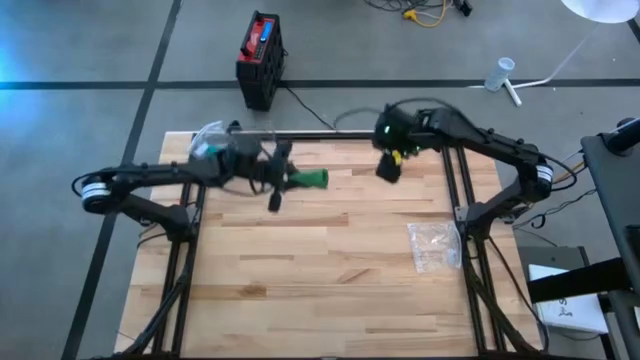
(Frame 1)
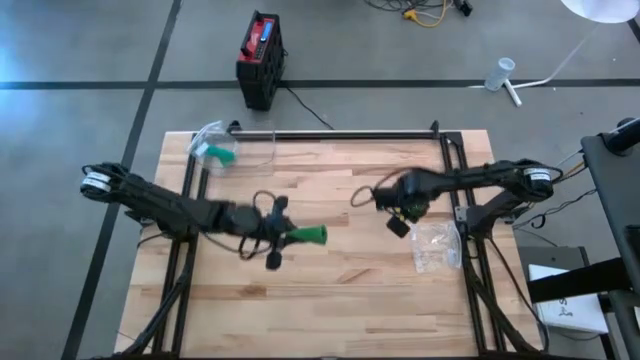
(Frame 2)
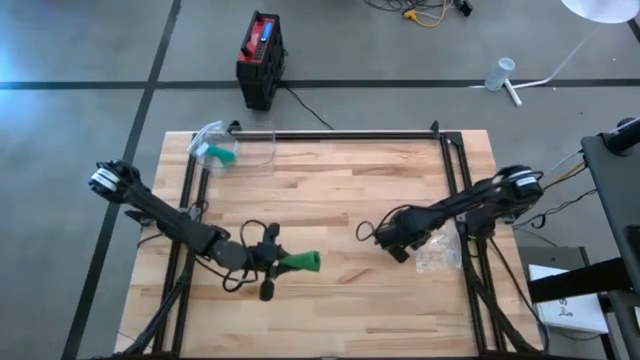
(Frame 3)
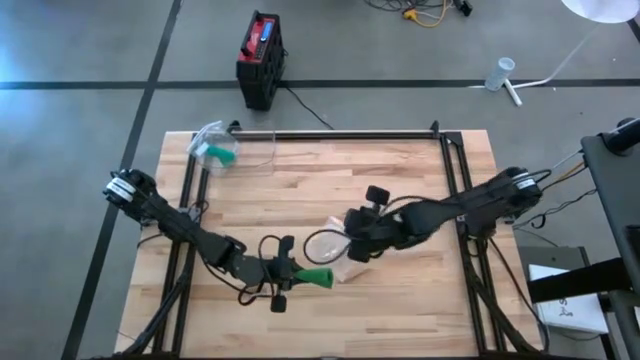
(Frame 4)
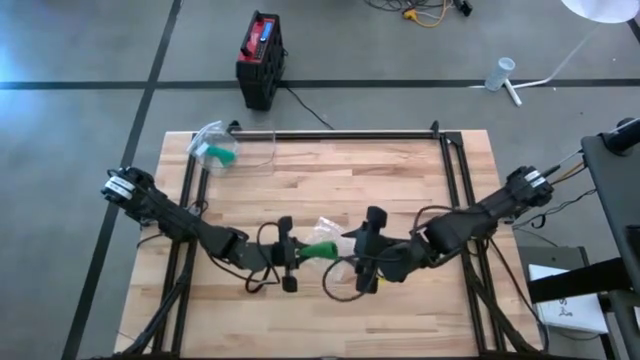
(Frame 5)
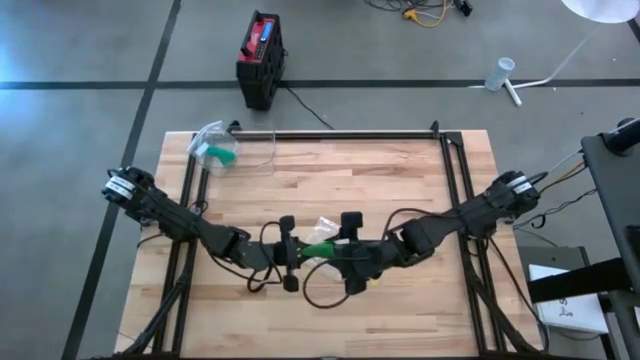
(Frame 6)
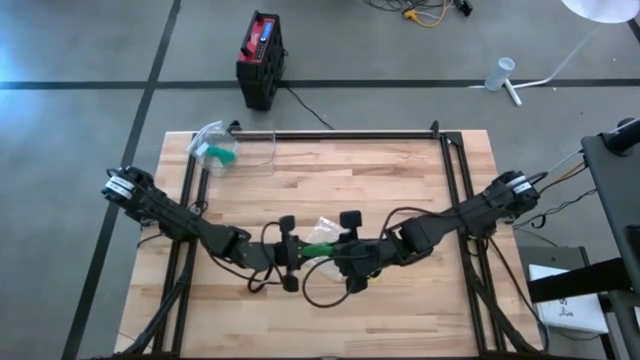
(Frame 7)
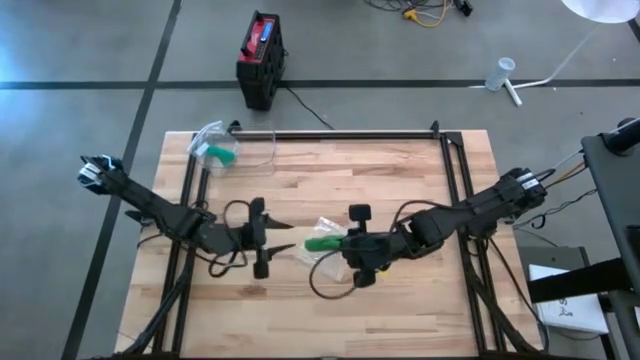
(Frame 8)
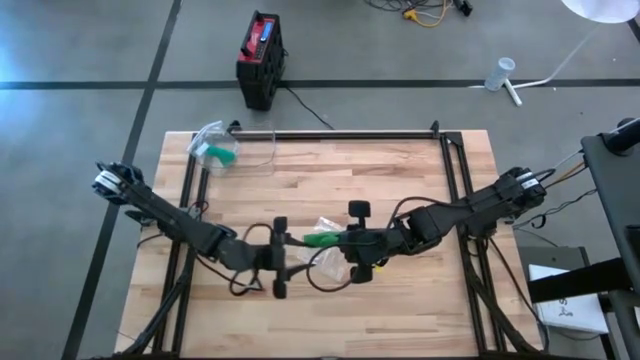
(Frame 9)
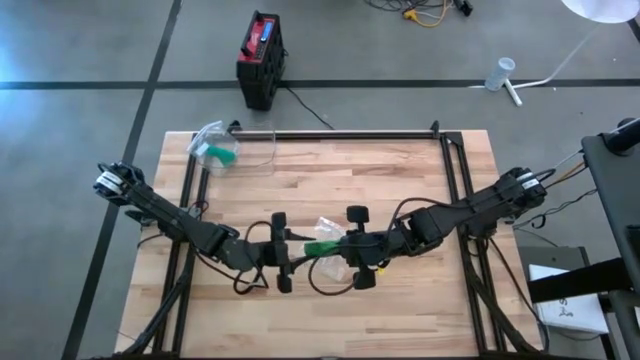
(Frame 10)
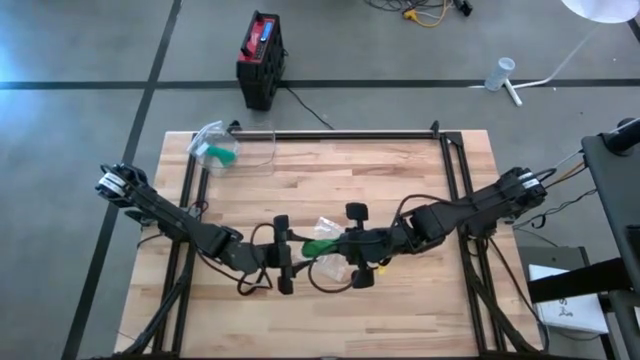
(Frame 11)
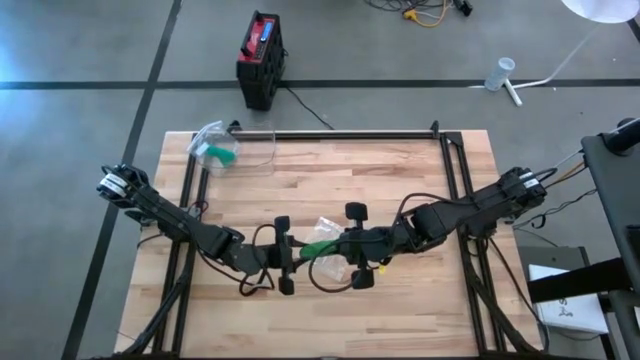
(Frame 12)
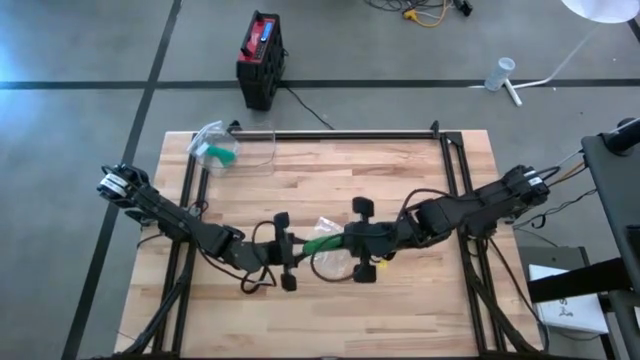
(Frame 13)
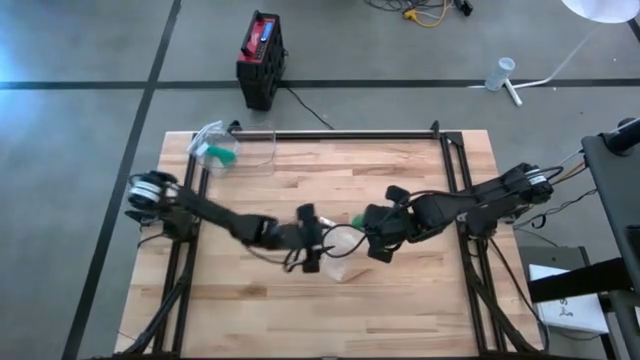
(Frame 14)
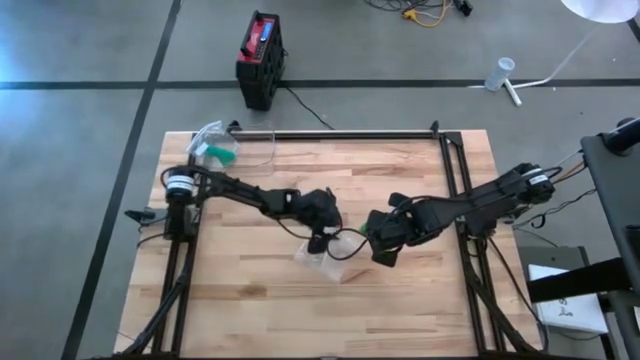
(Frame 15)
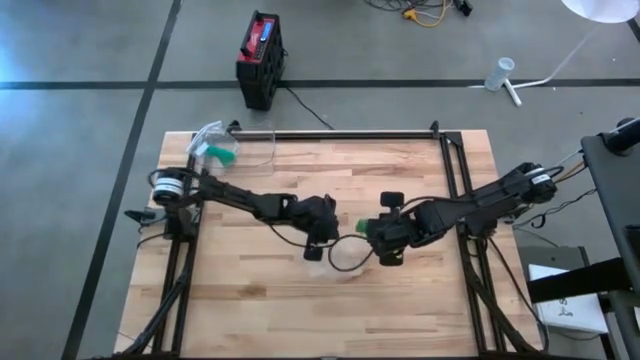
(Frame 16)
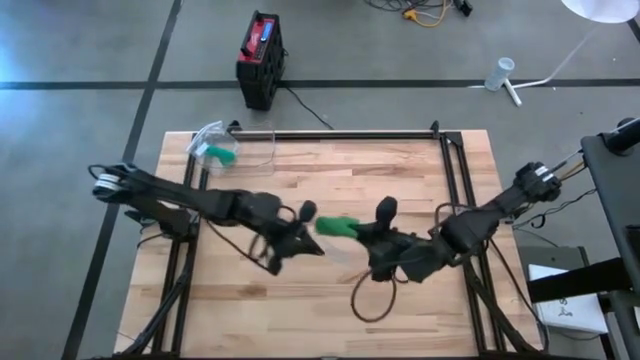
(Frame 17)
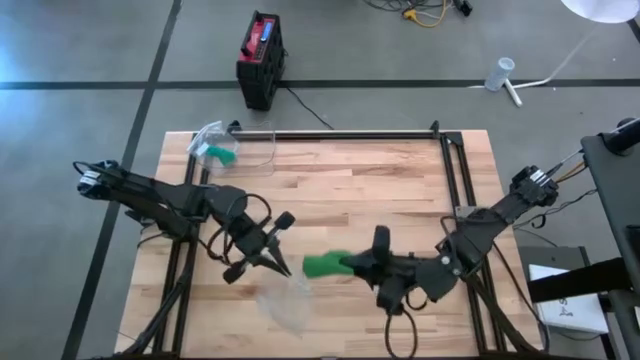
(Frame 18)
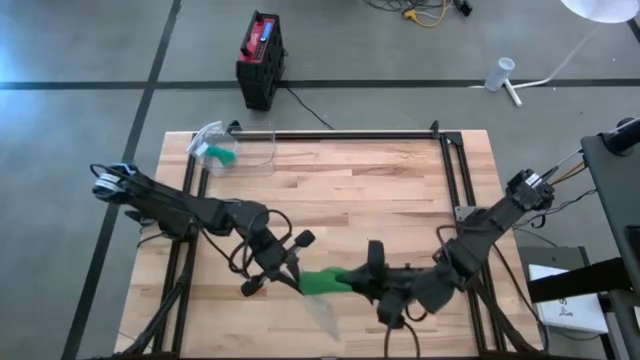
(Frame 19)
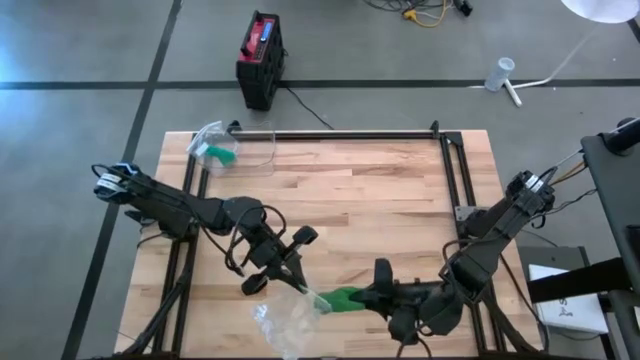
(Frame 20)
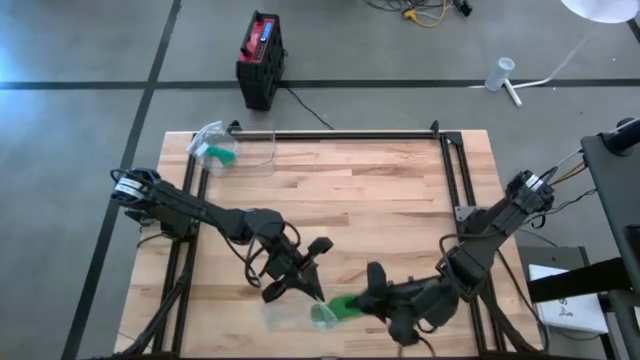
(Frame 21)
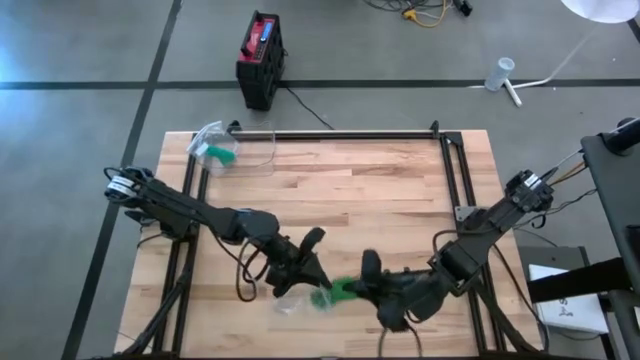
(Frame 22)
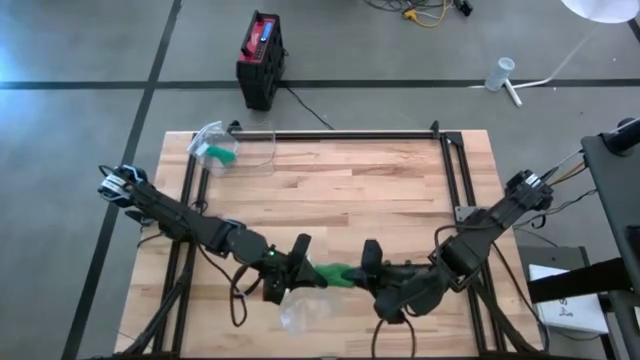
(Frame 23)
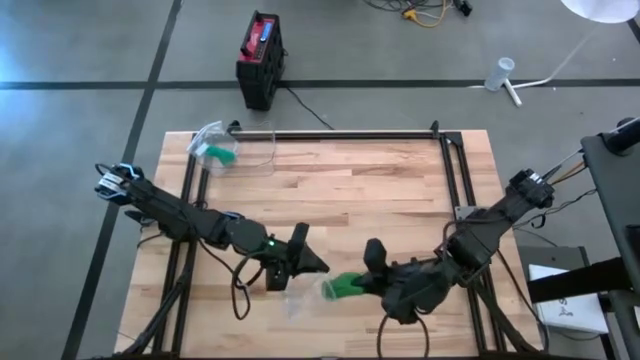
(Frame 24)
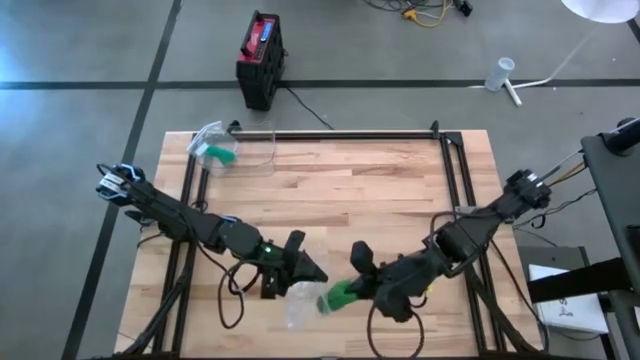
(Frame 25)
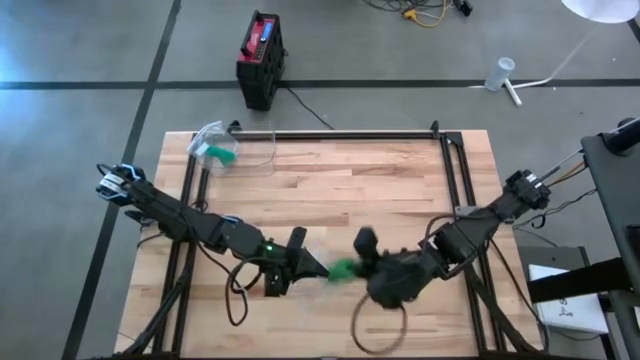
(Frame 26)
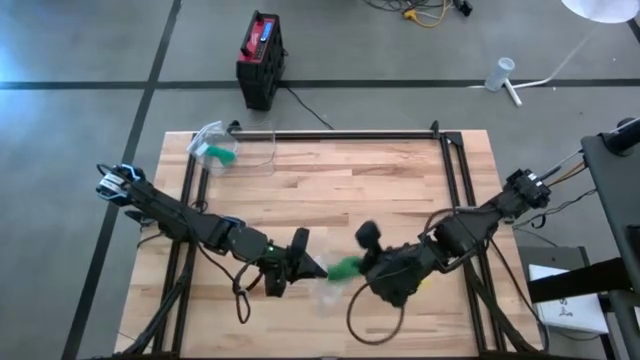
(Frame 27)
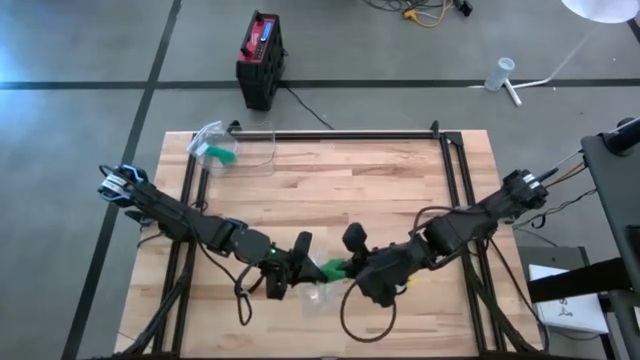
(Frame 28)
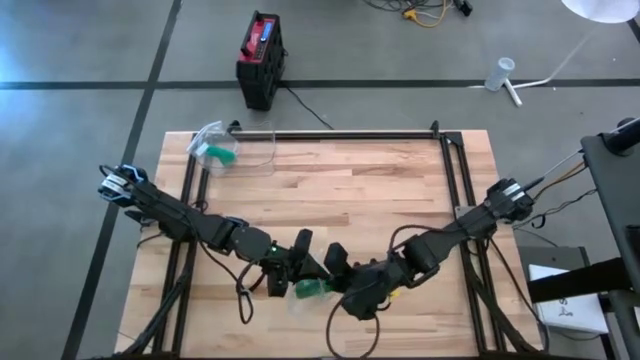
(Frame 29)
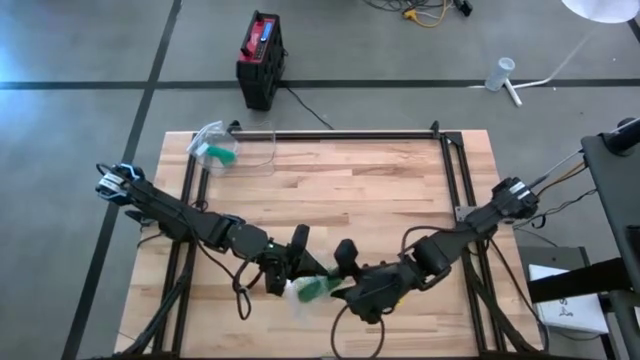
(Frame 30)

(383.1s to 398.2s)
Task: Roll bandage
Put the green rolled bandage into the transparent zip bag

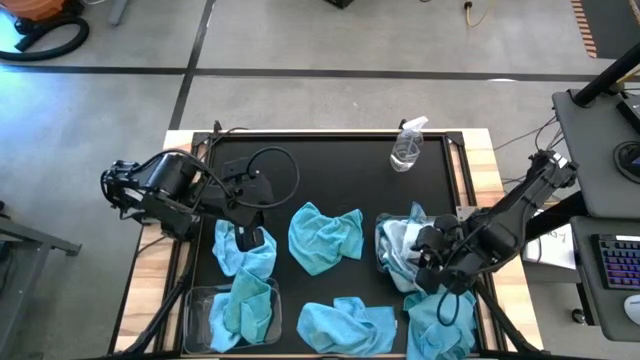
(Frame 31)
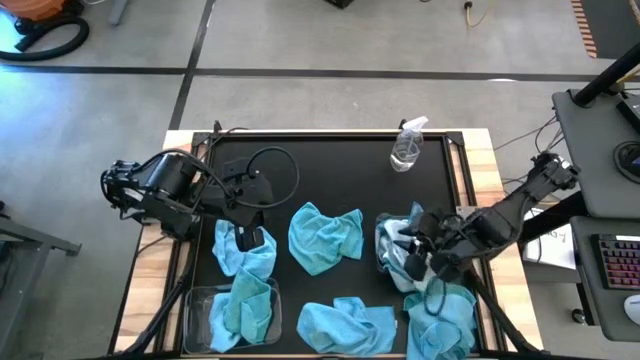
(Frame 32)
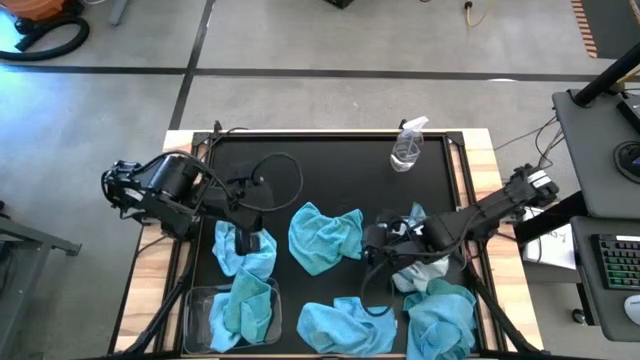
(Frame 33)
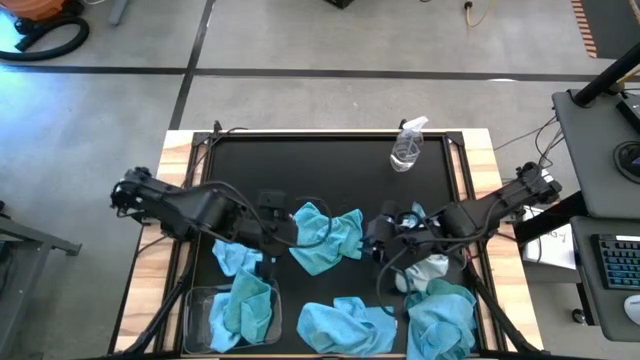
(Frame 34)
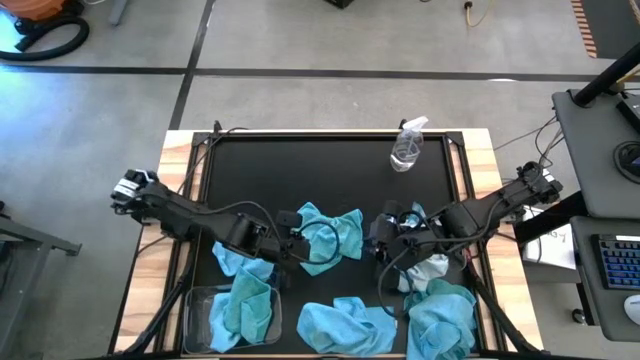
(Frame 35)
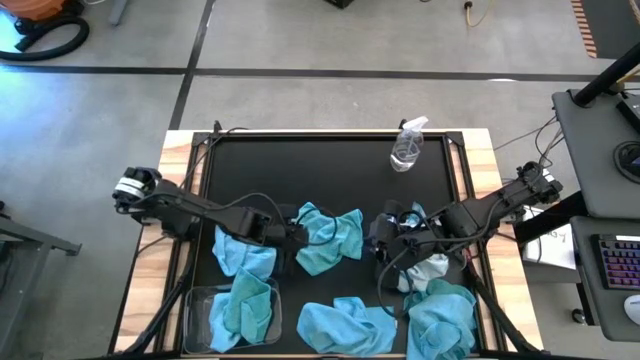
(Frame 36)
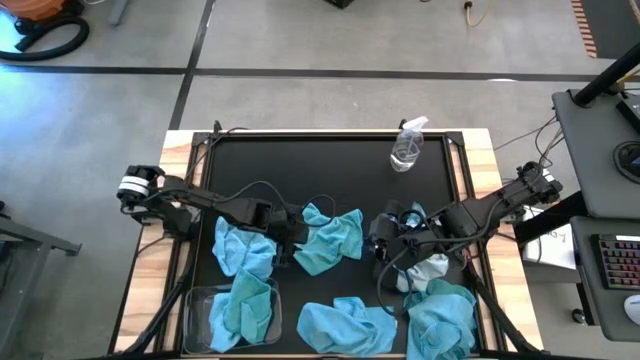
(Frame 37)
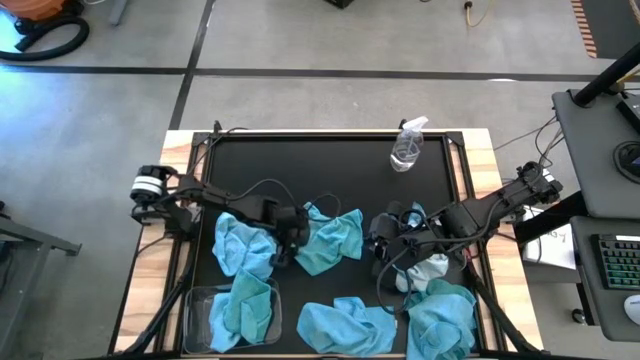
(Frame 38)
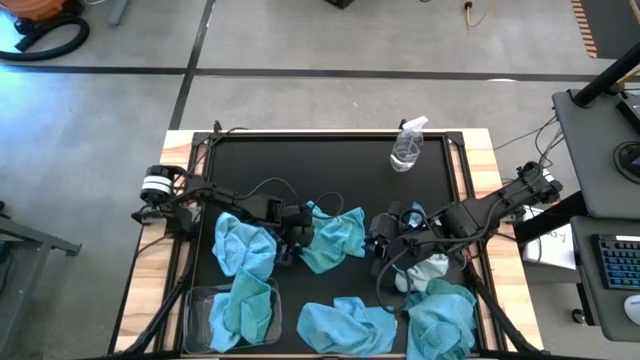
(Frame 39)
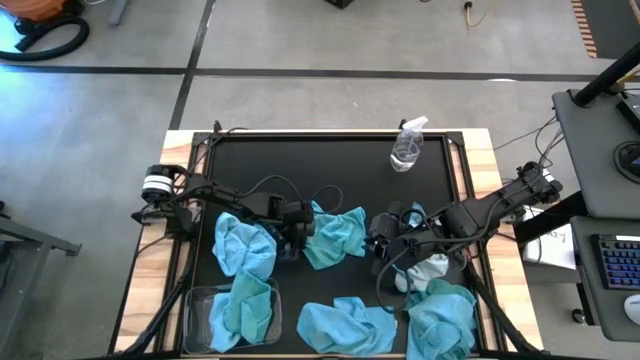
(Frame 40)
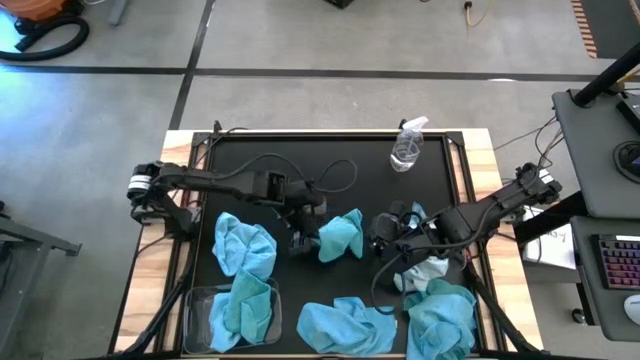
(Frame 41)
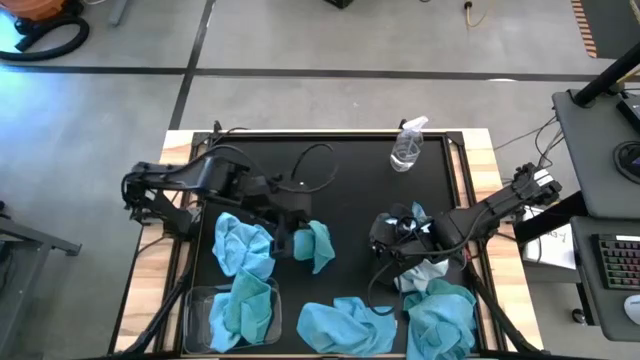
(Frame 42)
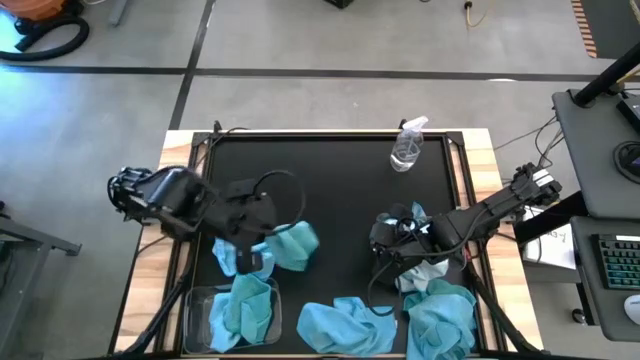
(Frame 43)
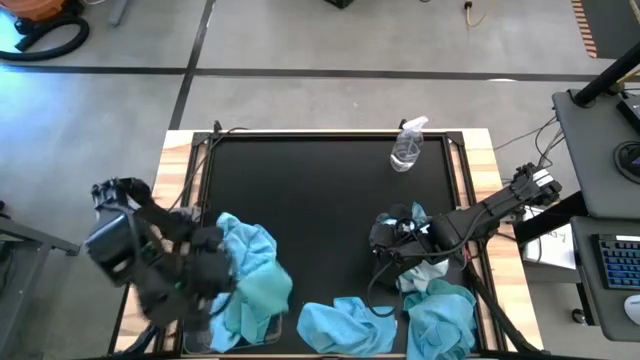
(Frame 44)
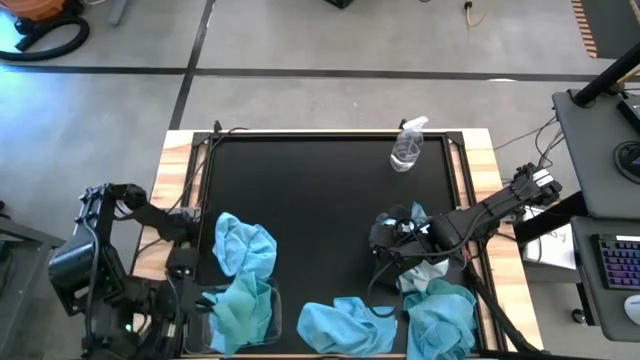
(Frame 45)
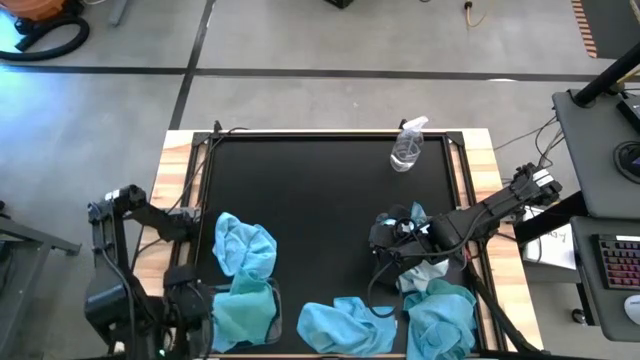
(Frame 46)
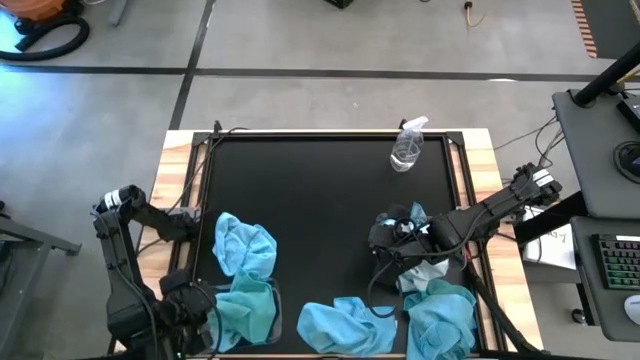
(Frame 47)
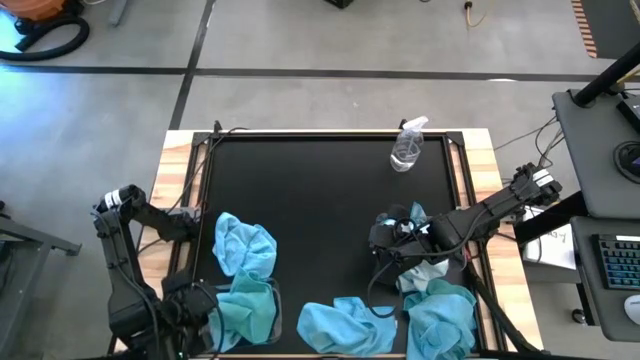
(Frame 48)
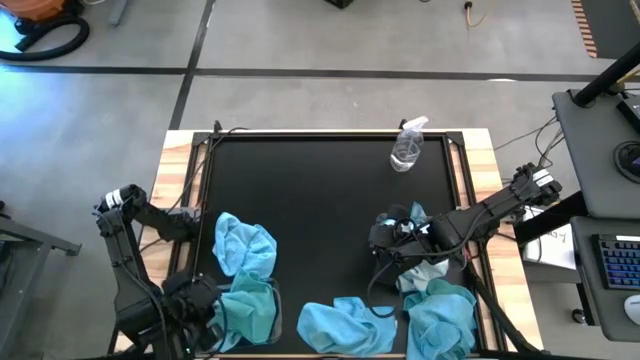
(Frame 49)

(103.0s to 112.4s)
Task: Sort microfiber towel by color & place in baskets
Put the blue microfiber towel into the left transparent bin
